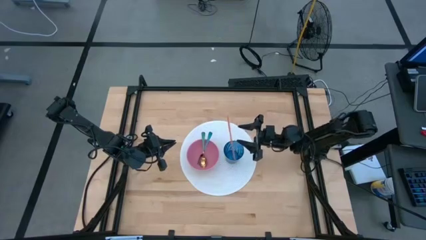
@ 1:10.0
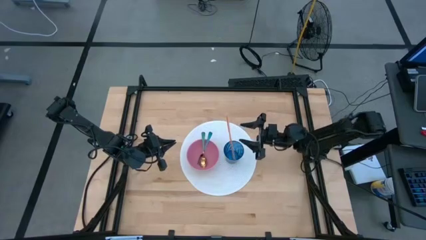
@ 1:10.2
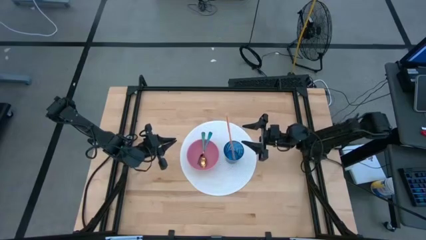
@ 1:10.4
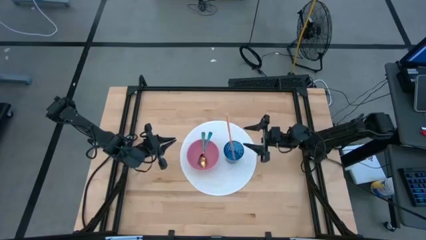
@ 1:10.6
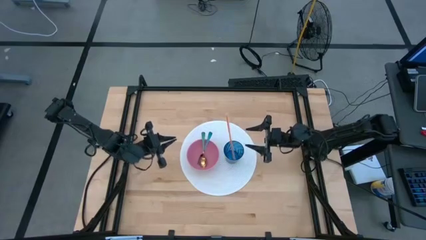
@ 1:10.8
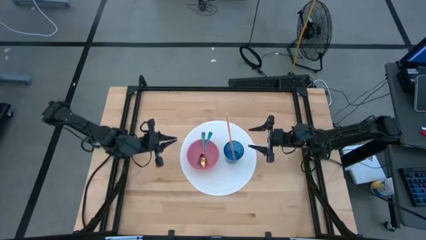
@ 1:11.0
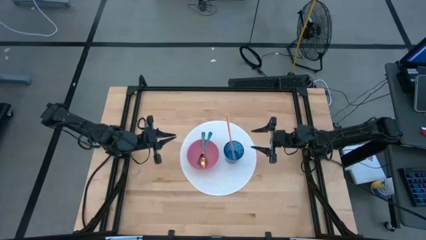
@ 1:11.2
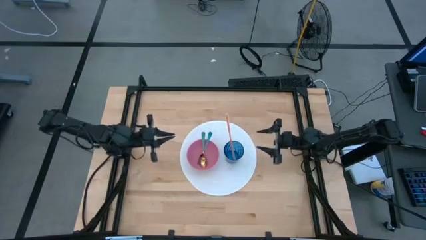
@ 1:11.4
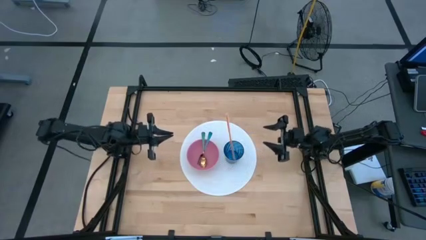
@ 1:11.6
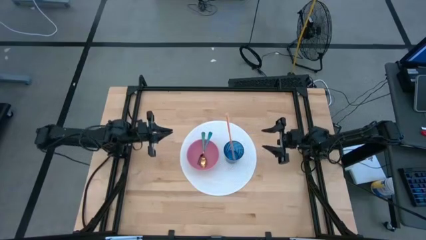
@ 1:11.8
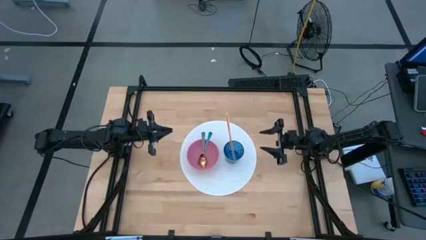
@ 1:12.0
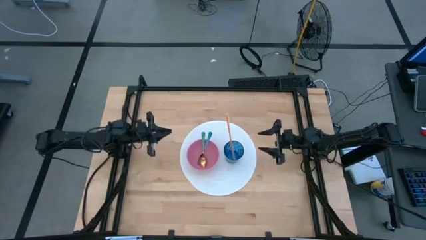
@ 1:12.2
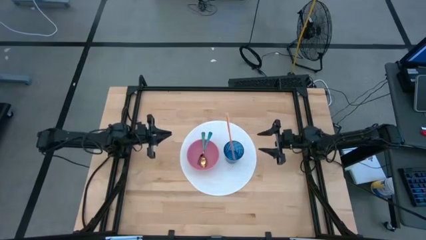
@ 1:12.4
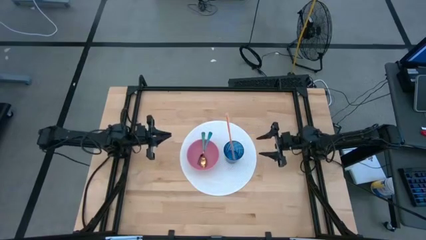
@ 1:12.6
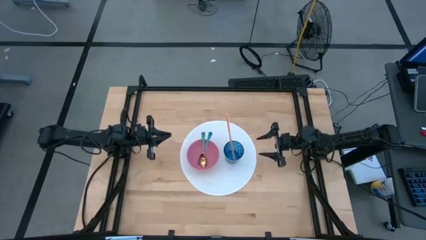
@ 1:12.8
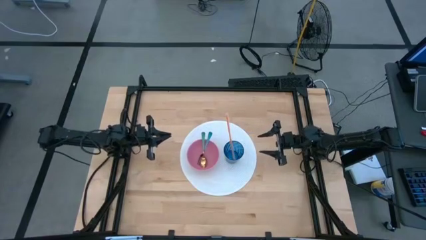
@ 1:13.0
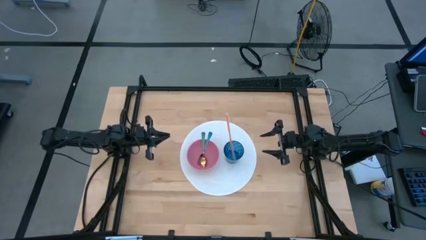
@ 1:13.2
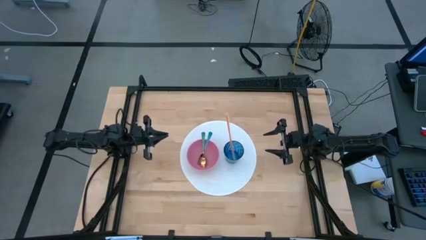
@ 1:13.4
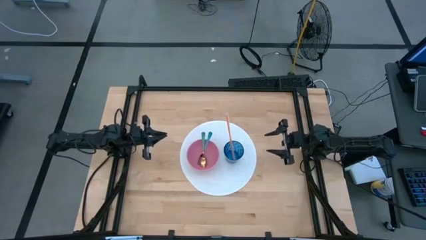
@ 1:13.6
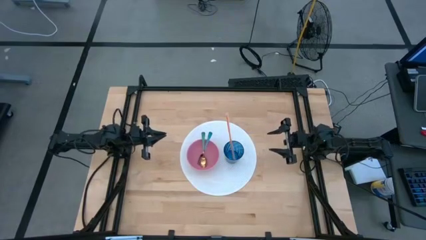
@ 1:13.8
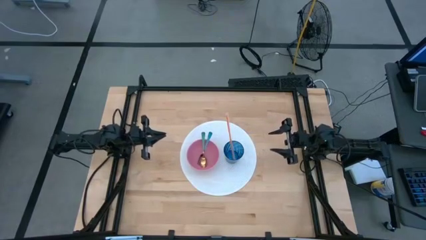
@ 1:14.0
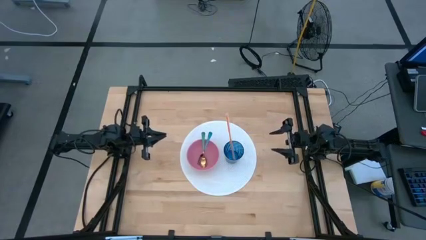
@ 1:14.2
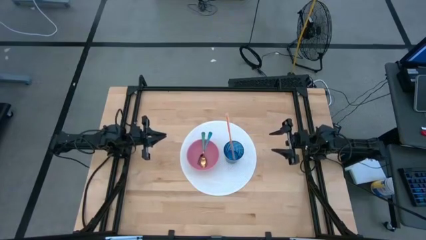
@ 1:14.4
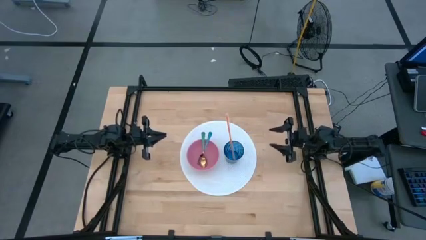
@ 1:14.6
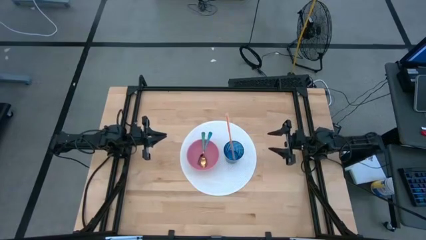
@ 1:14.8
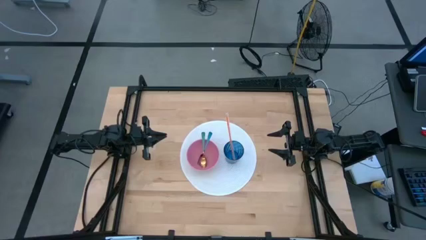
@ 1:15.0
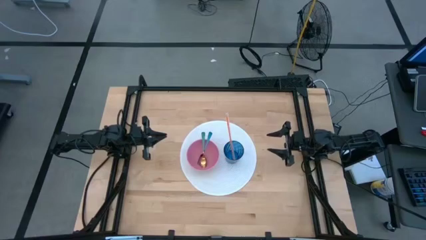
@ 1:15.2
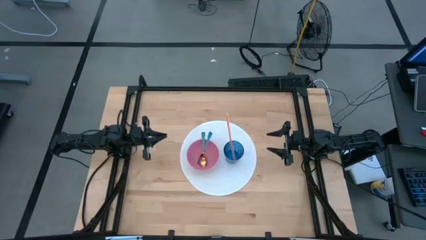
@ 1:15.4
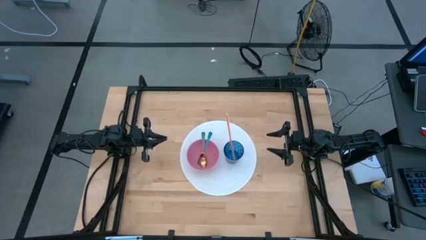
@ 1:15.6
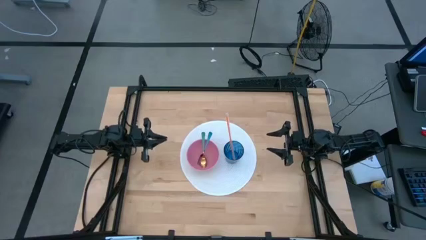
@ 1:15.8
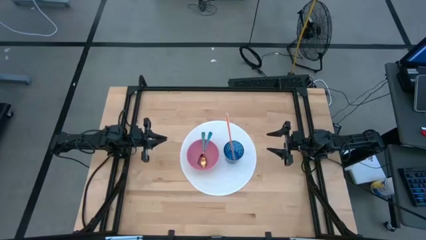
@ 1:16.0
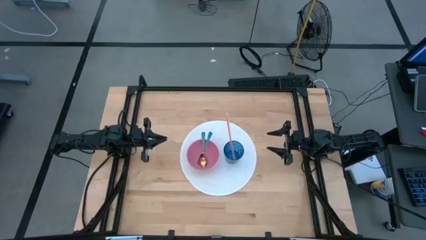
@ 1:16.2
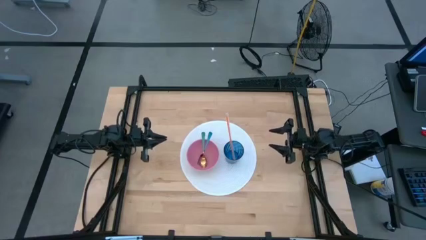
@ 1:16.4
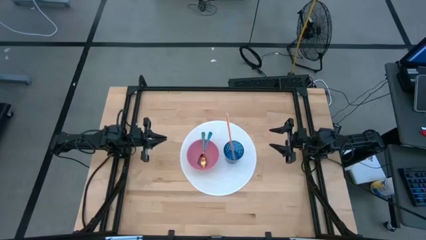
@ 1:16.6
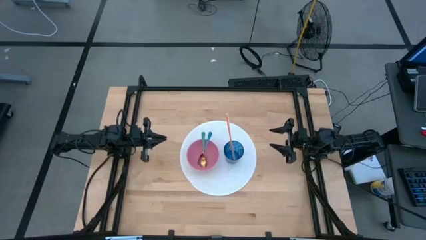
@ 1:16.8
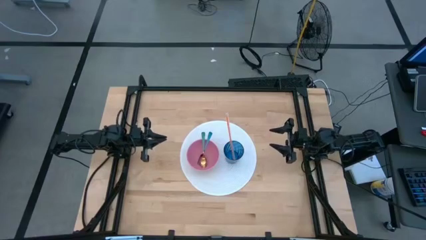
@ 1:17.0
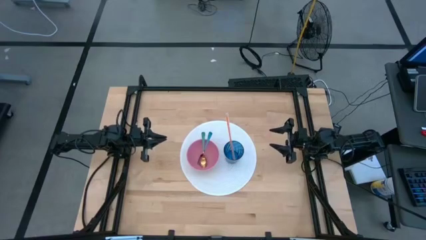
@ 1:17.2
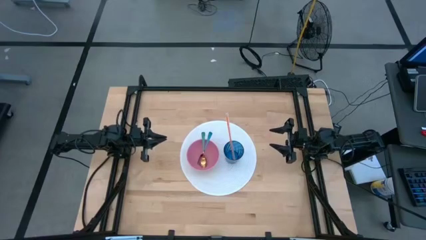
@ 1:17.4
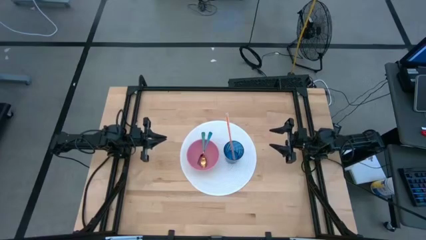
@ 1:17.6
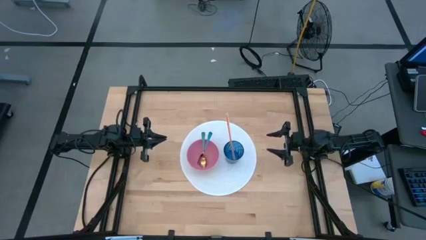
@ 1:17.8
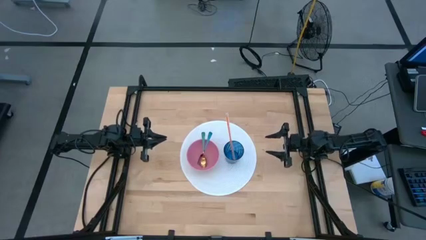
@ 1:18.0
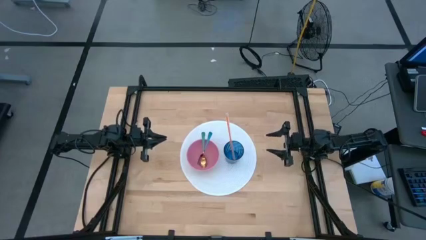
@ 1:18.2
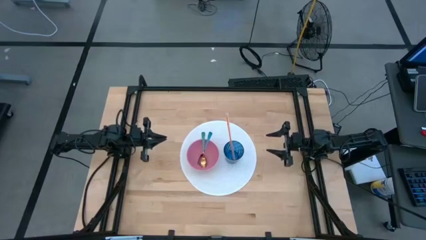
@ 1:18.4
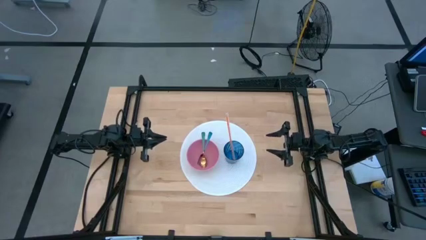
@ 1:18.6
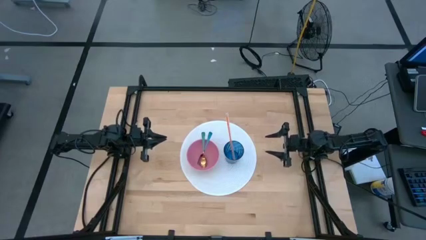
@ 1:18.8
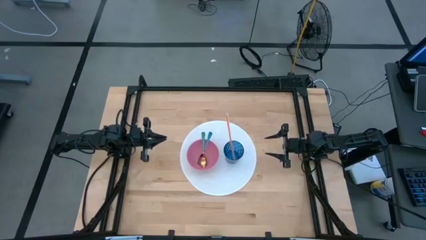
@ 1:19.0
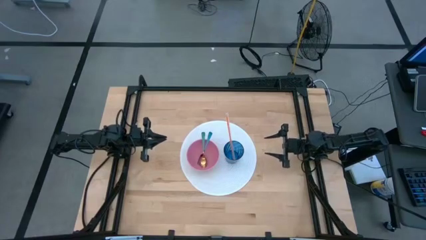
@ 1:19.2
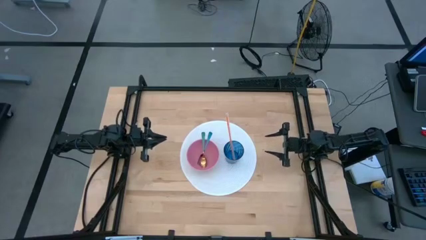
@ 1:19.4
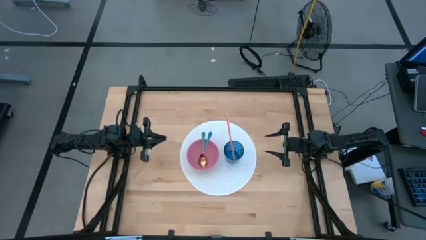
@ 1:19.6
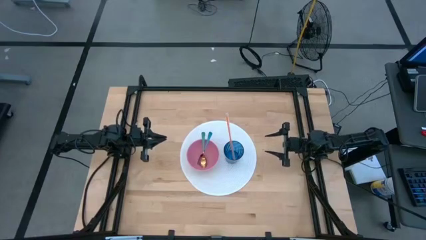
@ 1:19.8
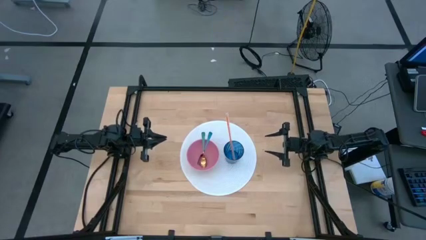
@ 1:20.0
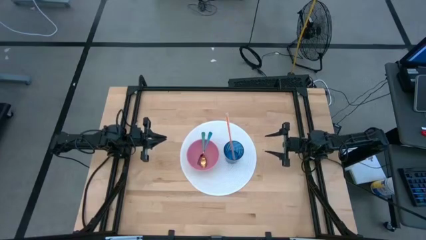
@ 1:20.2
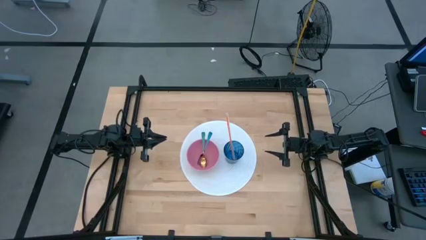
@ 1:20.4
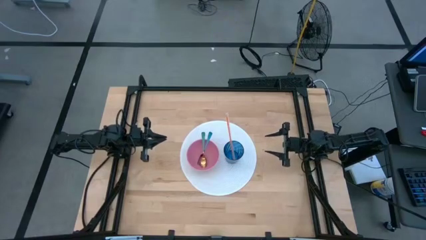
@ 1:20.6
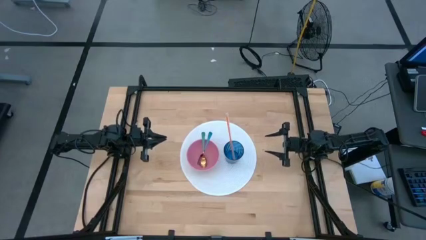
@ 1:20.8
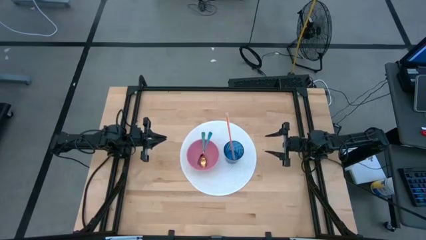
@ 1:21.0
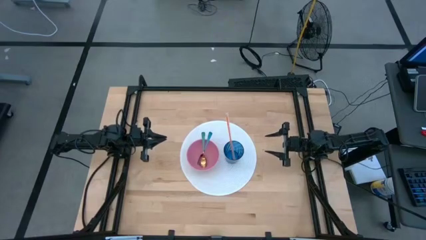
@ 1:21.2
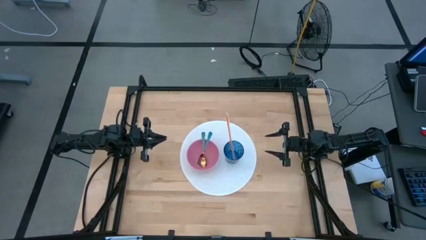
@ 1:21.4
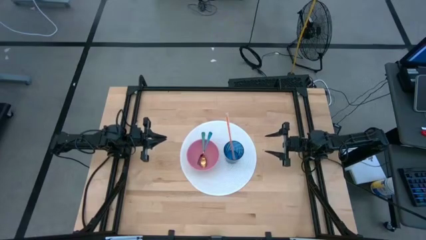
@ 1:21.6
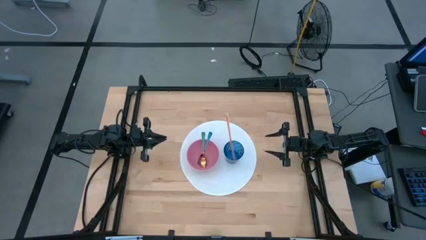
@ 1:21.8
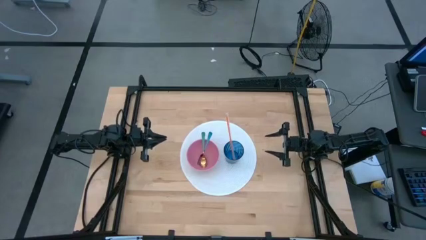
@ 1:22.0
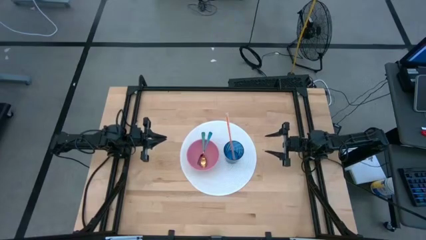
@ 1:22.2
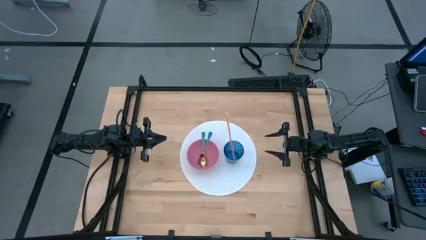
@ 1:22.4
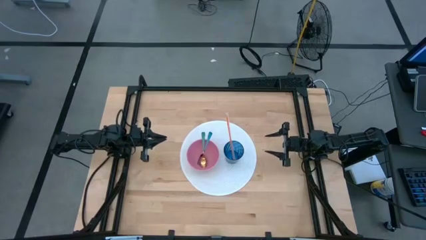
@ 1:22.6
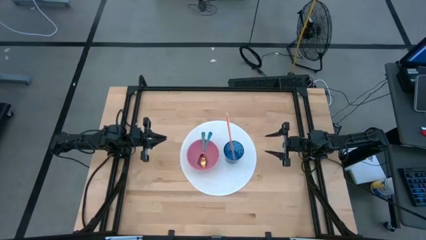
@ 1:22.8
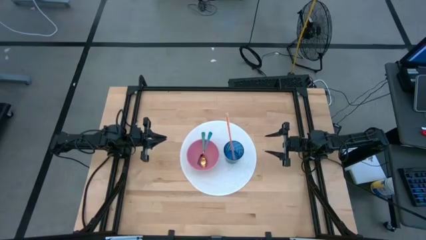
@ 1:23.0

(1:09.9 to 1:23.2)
Task: Pick & Place Utensil
Return to Home Position

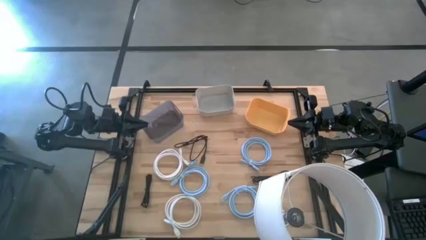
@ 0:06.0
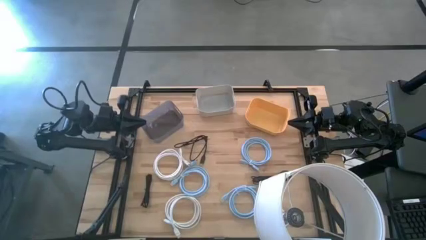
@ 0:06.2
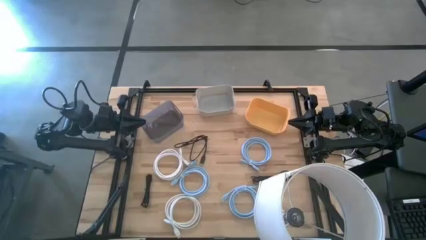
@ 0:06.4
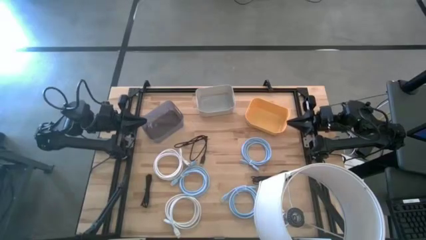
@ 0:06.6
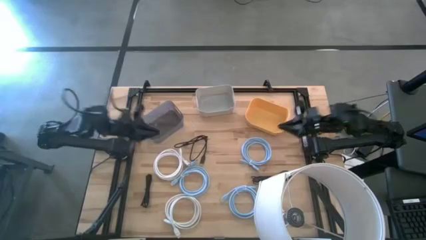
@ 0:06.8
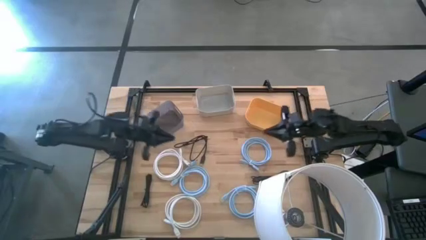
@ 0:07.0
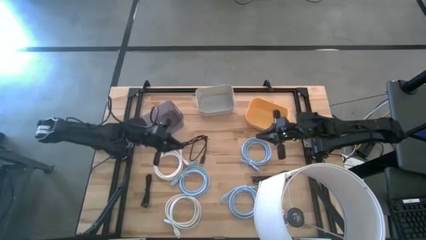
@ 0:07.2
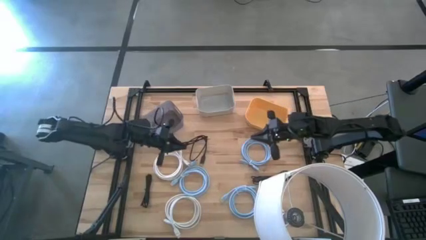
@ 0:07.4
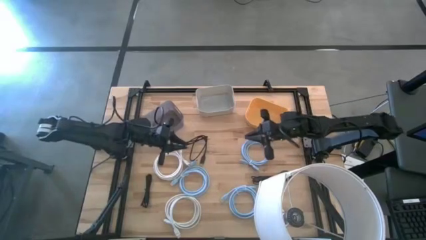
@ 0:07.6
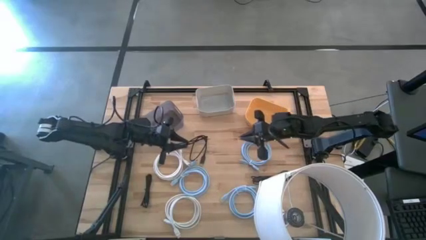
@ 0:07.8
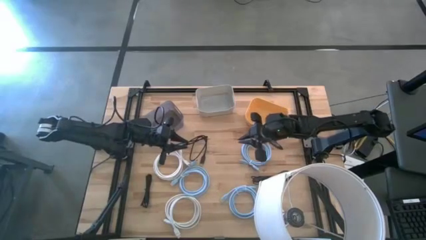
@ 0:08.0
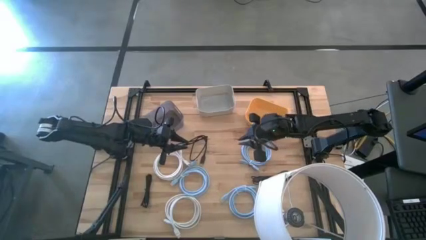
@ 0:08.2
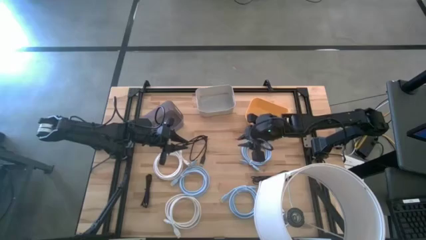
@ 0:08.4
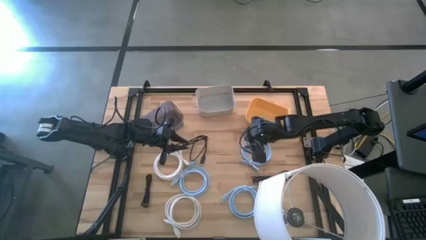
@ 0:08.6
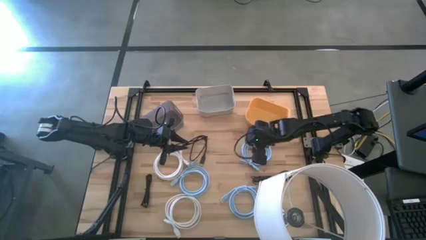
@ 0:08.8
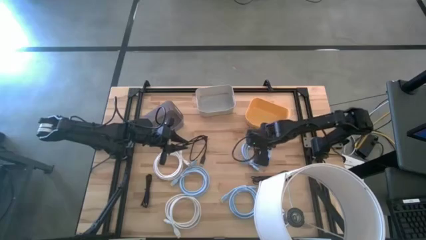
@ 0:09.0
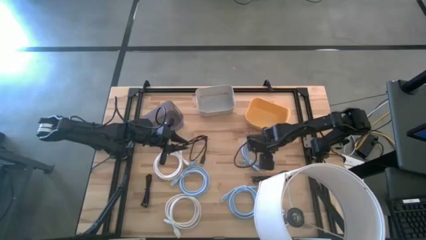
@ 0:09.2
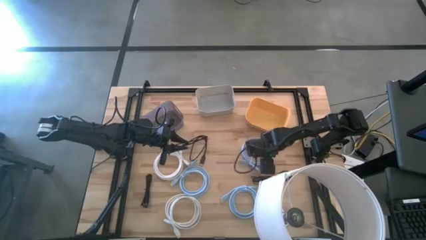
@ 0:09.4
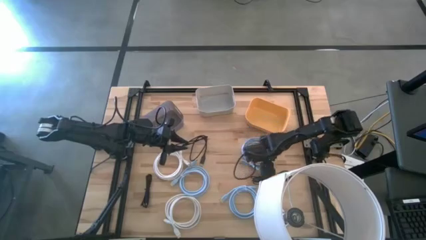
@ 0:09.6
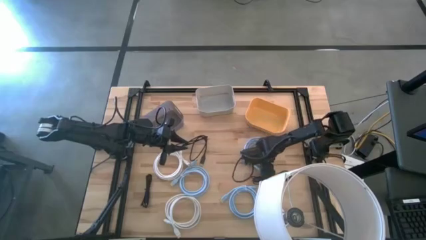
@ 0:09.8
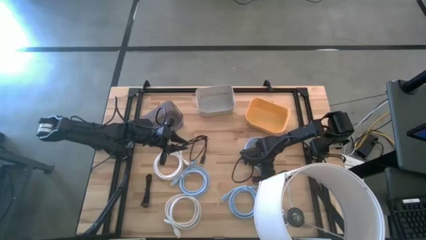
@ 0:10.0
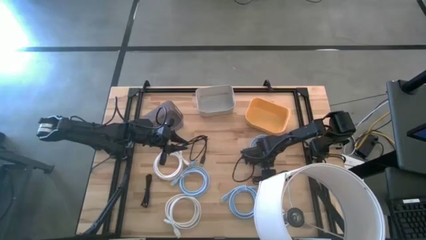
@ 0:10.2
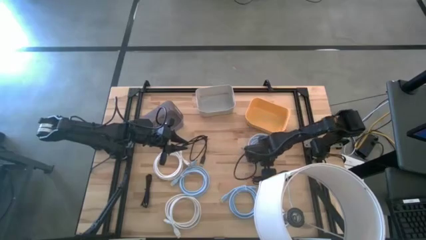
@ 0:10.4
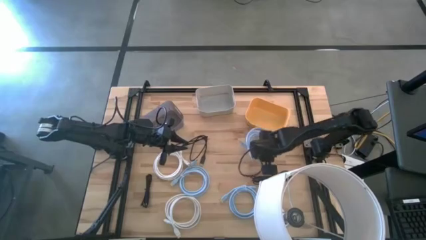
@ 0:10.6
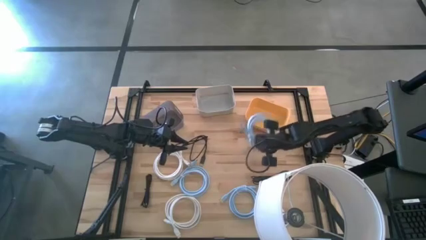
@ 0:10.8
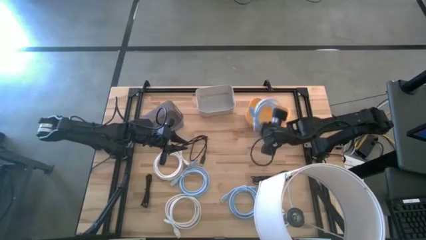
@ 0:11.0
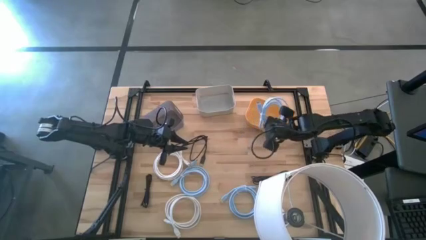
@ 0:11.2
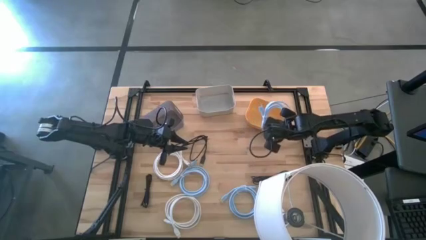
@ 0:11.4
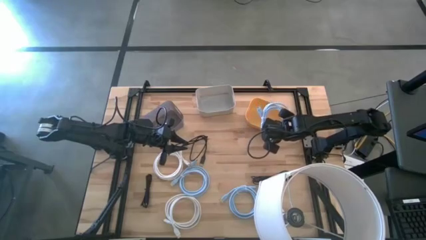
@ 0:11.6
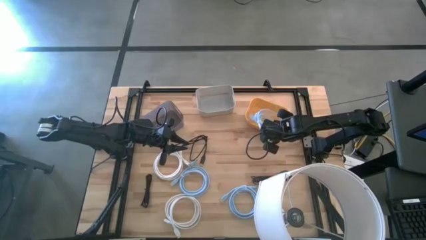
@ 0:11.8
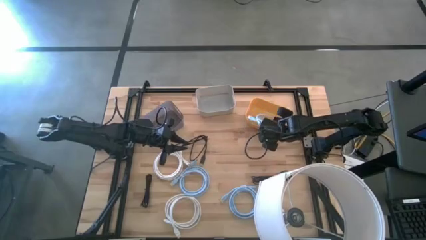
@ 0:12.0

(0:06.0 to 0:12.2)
Task: Pick & Place USB Port
Put the top blue hdmi cable into the yellow bin
